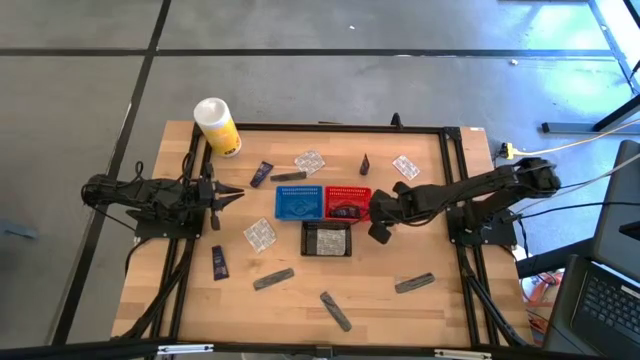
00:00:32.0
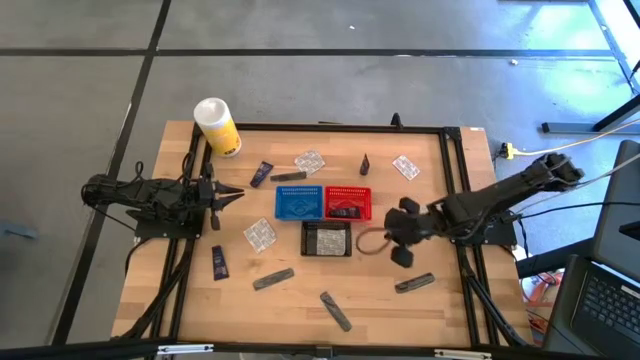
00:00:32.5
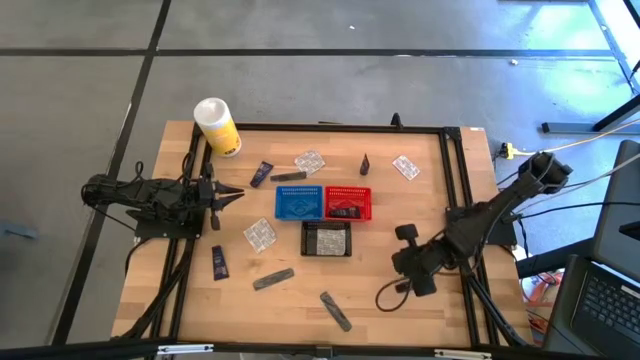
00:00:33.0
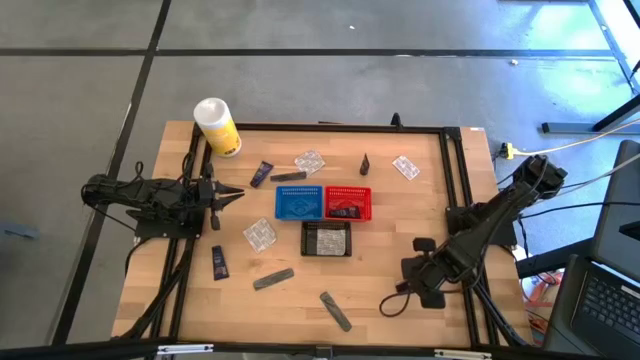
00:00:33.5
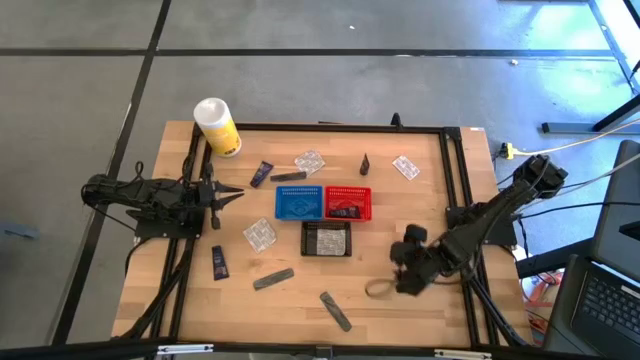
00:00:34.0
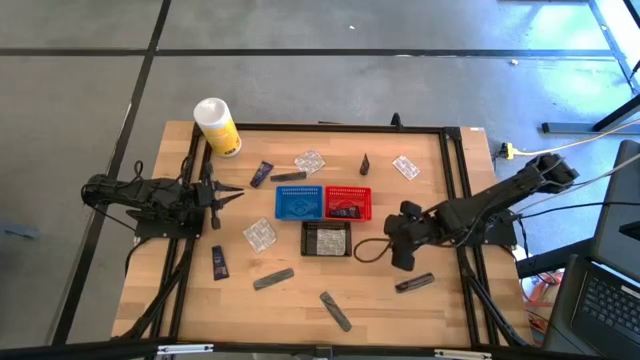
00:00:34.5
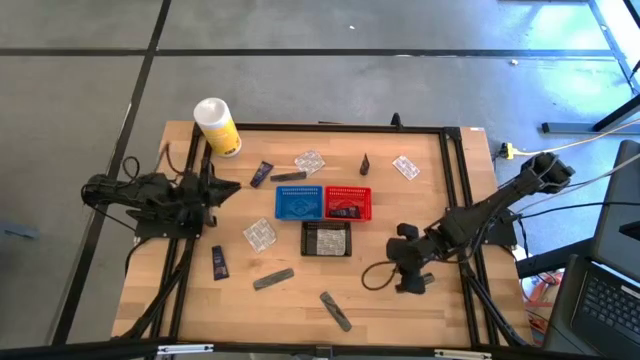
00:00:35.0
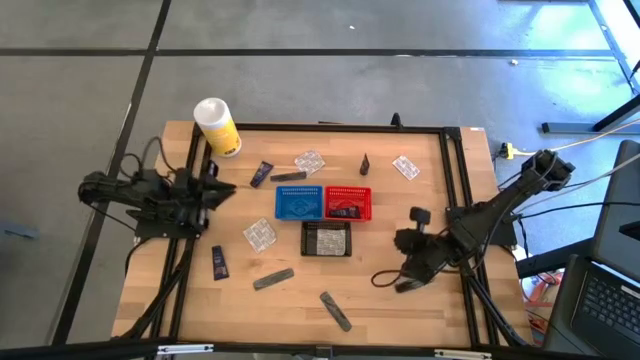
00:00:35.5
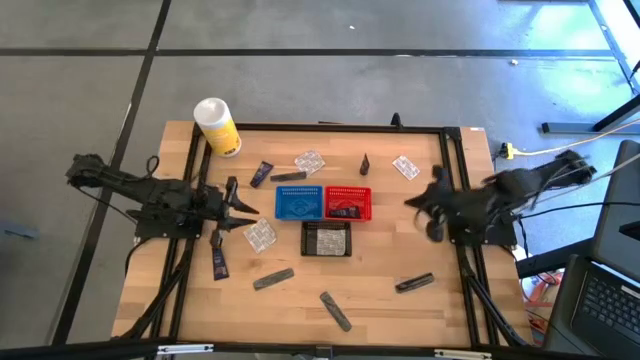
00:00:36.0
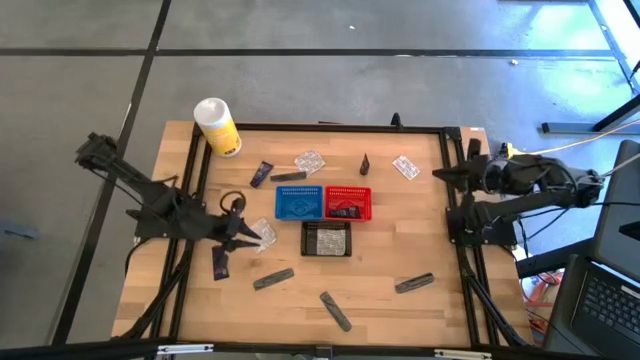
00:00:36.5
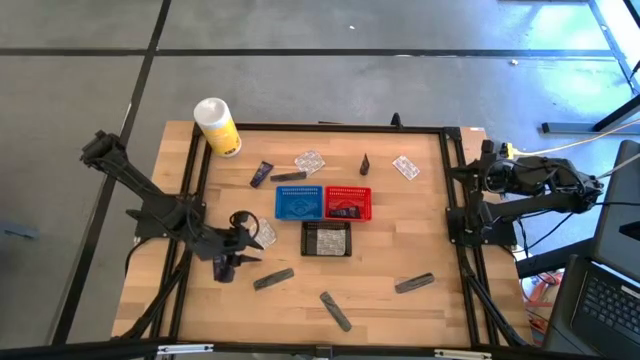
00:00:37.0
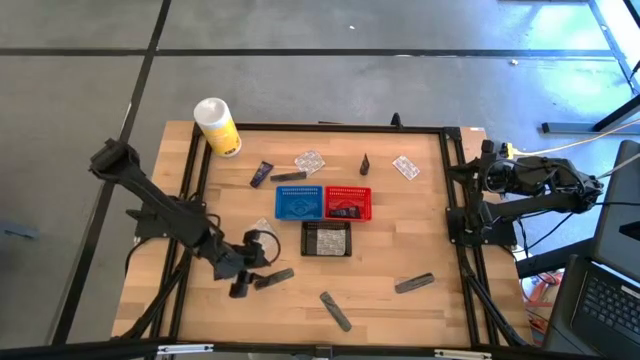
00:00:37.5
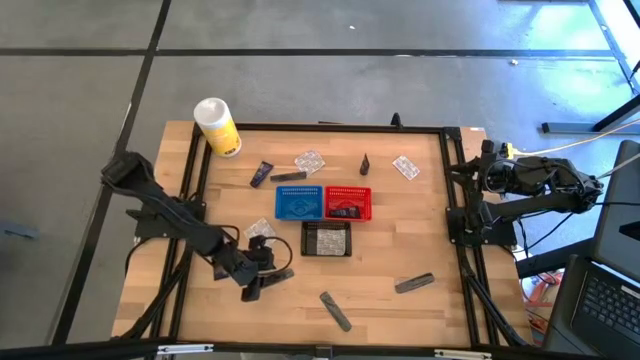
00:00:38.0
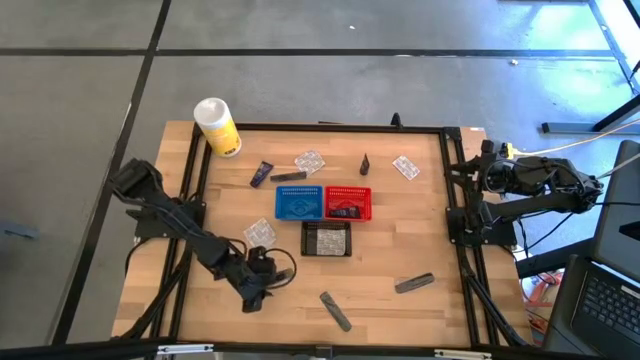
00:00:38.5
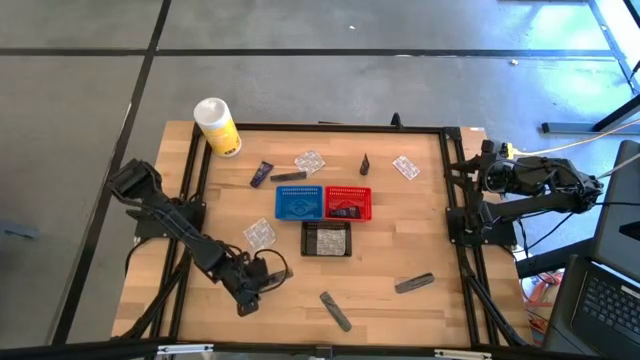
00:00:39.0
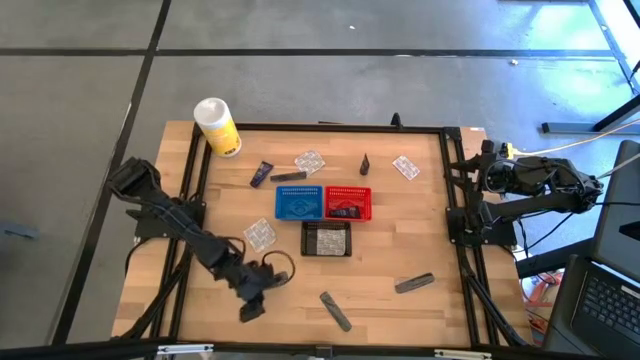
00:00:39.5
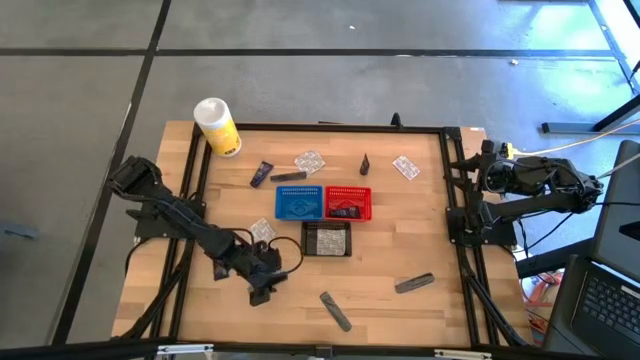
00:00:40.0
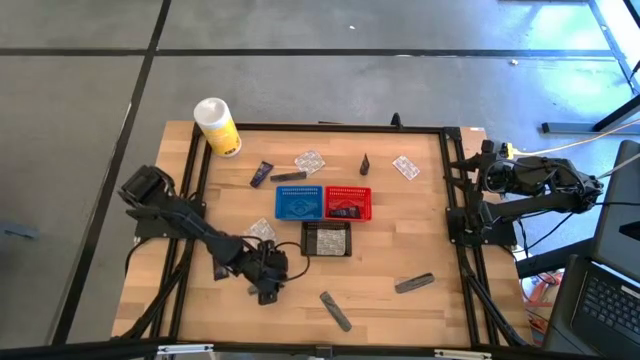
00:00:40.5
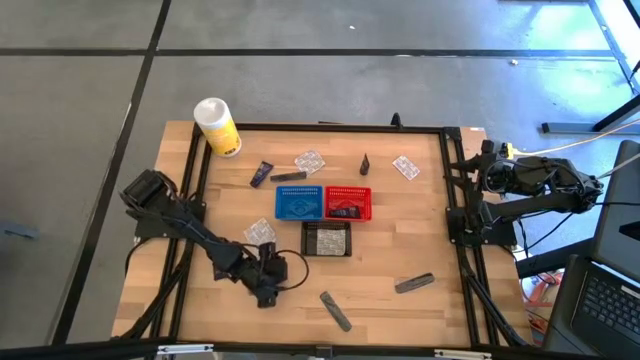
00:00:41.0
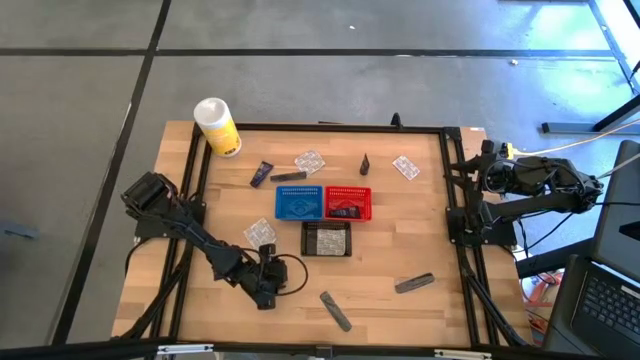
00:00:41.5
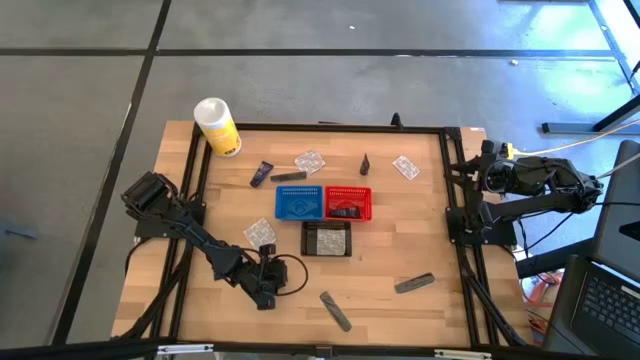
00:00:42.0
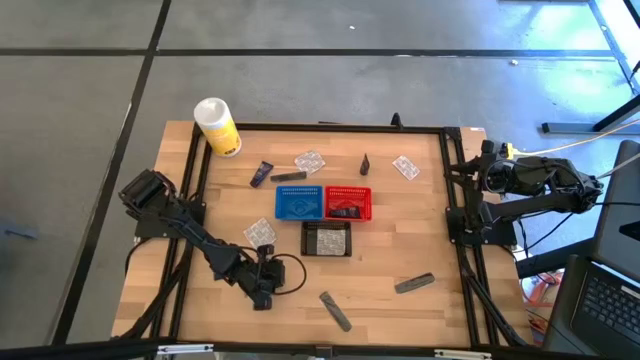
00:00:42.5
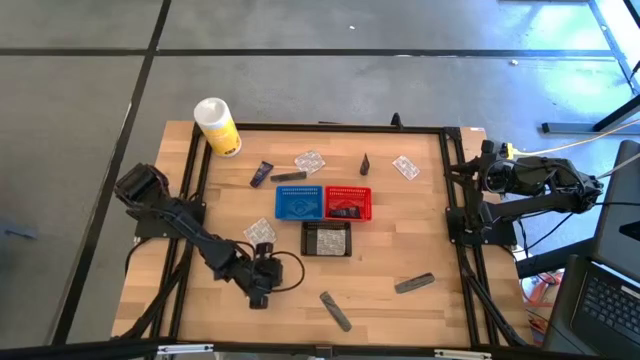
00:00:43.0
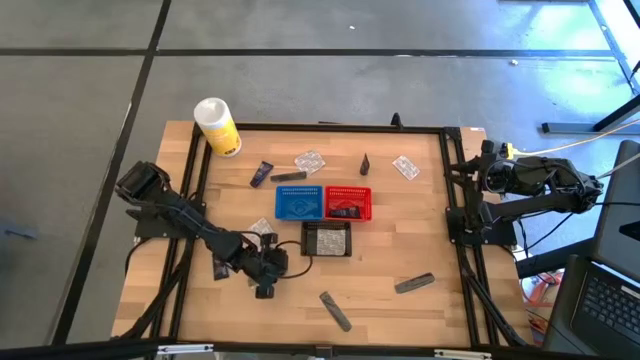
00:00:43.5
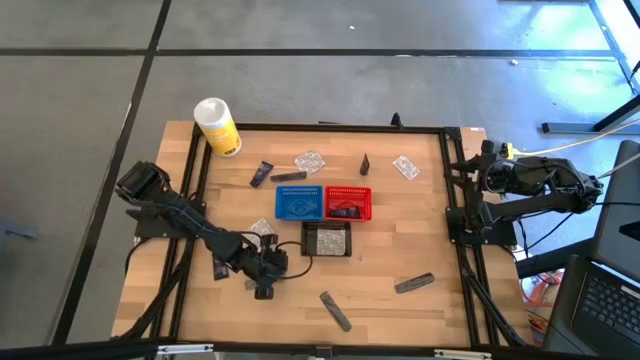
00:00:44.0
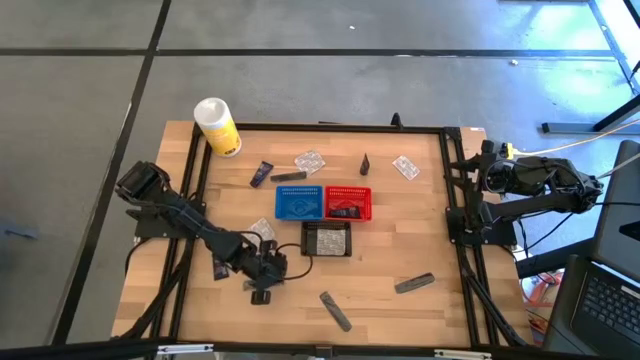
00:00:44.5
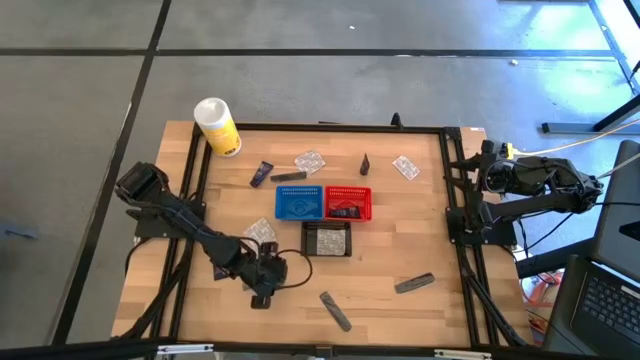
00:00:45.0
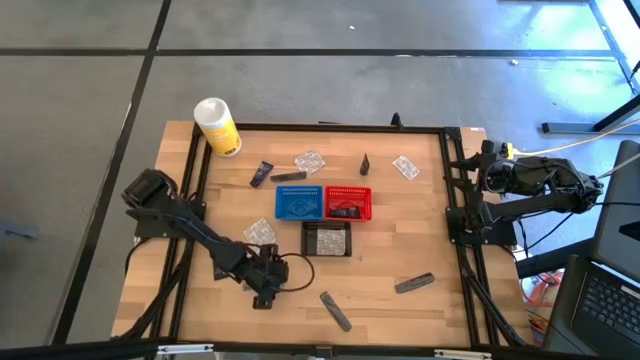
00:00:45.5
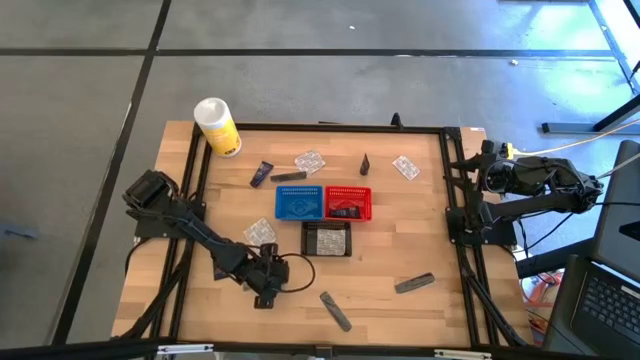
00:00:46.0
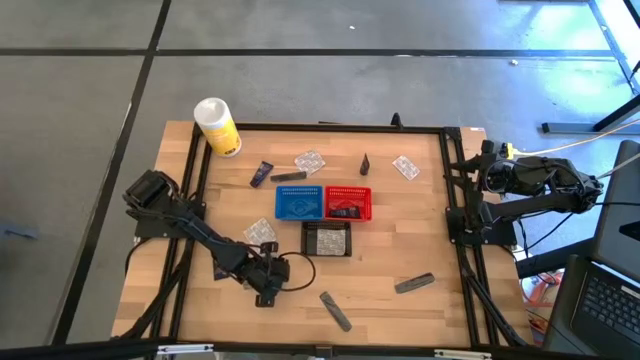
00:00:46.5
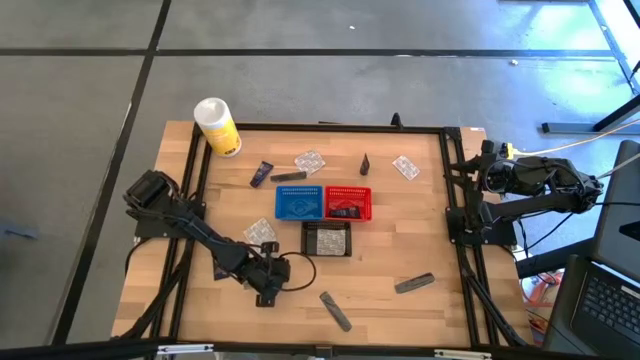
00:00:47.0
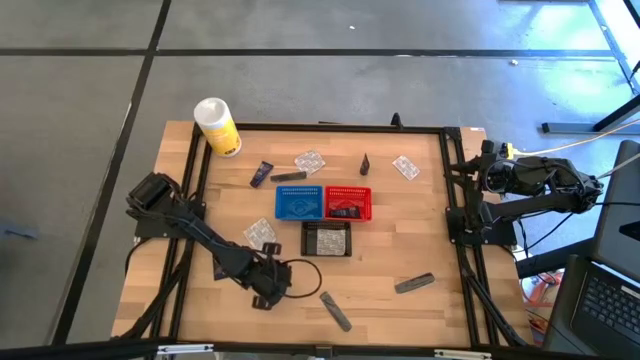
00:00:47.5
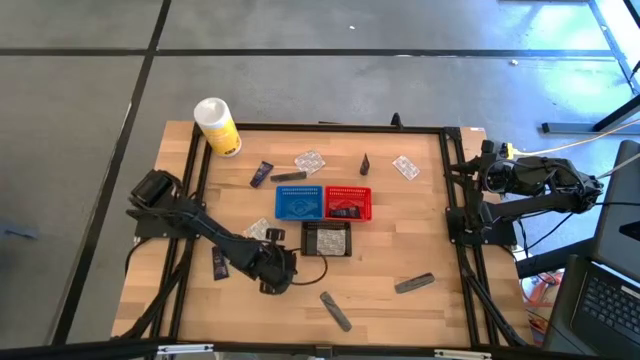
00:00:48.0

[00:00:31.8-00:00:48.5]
Task: Pick & Place Travel size toiletries
Put the black comb into the blue bin

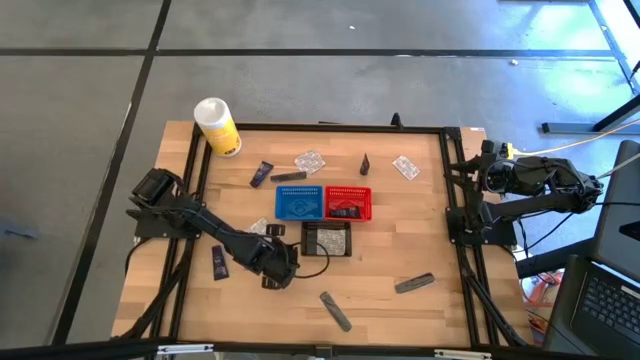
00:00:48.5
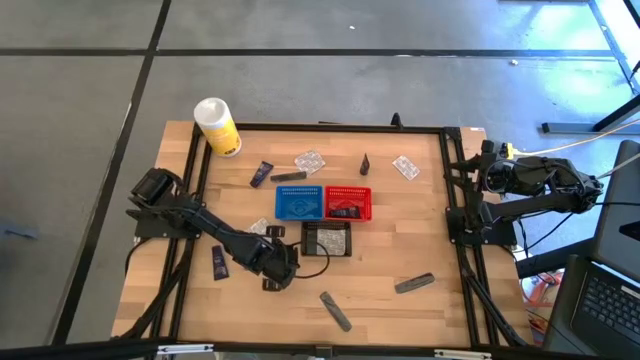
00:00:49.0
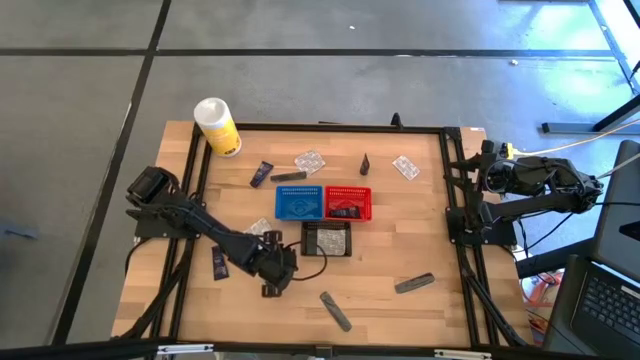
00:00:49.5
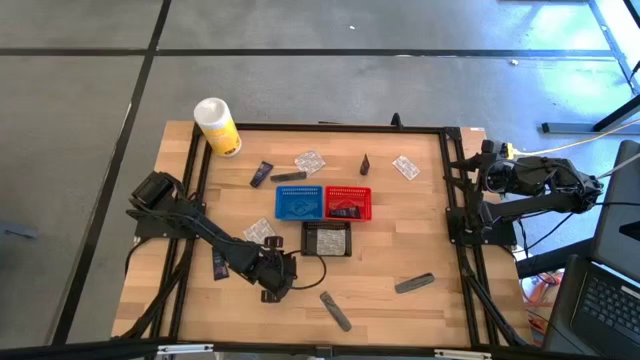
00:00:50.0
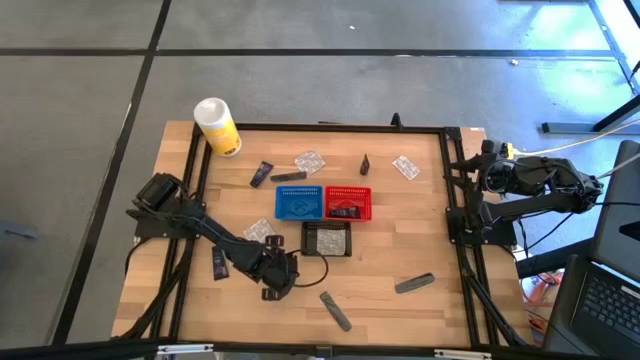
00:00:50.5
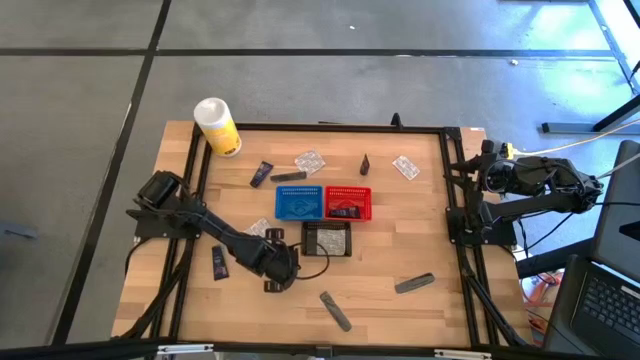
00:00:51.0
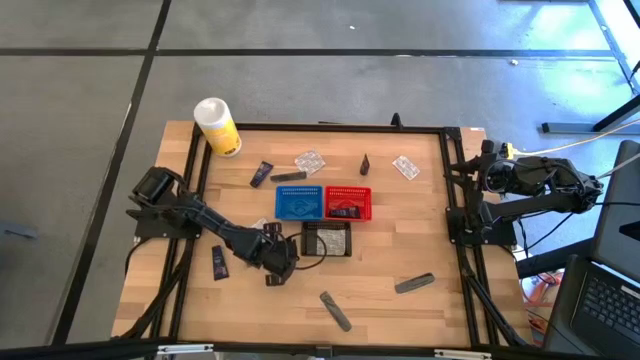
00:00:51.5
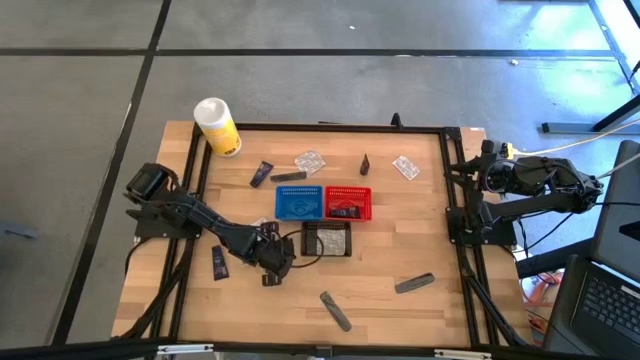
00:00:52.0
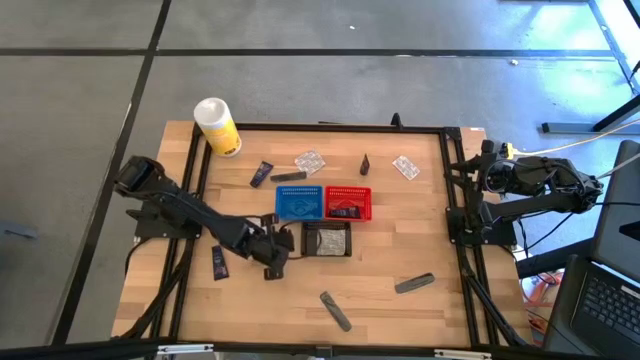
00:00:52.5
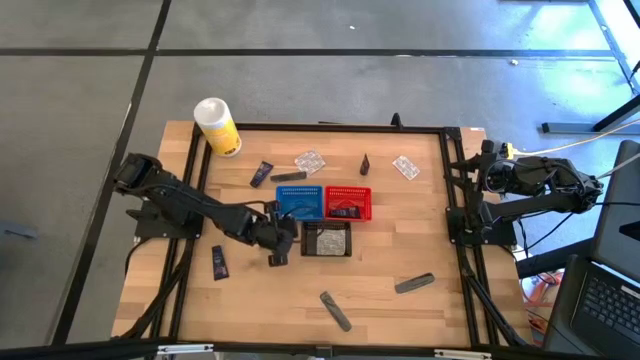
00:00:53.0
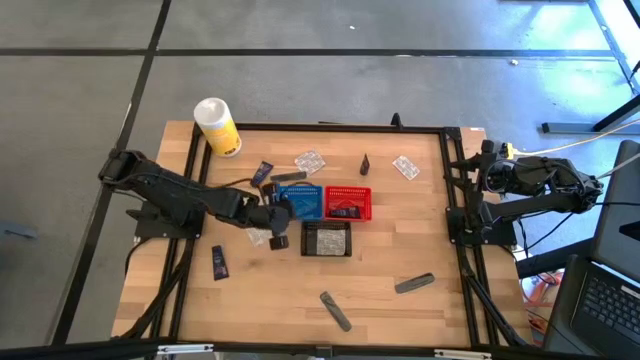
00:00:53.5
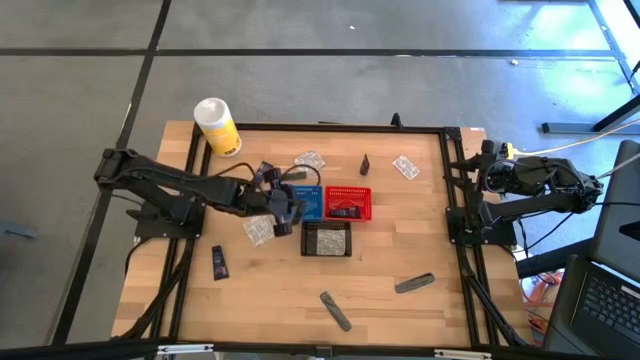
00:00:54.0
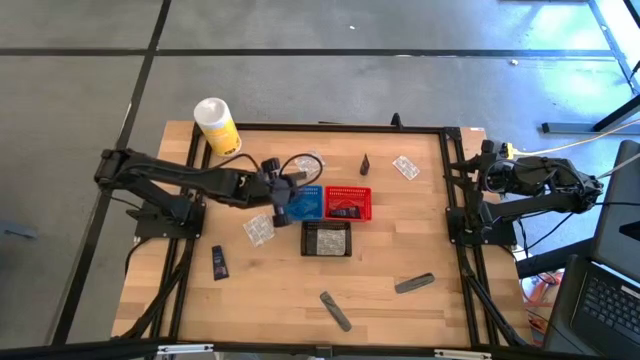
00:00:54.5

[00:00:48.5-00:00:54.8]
Put the black comb into the blue bin
